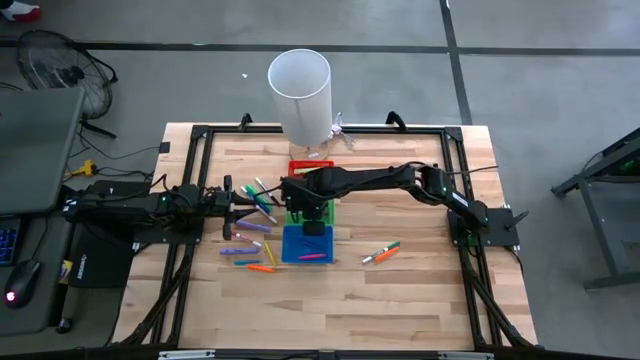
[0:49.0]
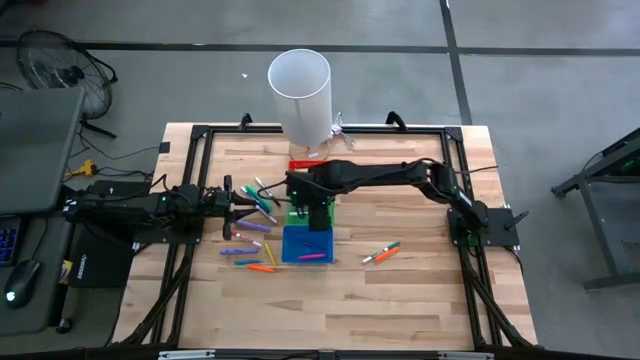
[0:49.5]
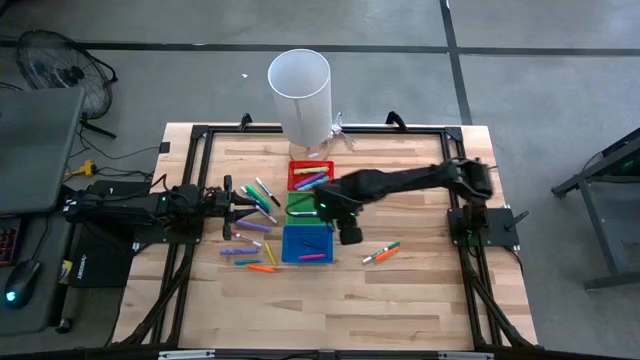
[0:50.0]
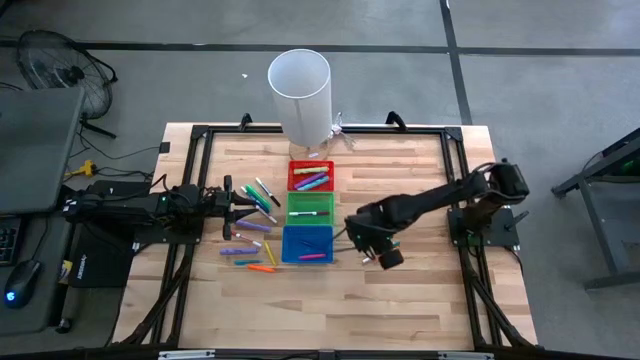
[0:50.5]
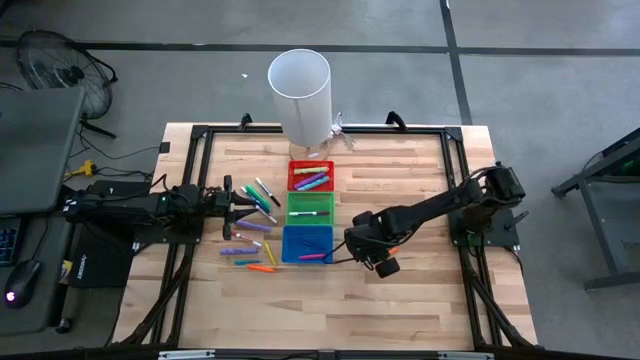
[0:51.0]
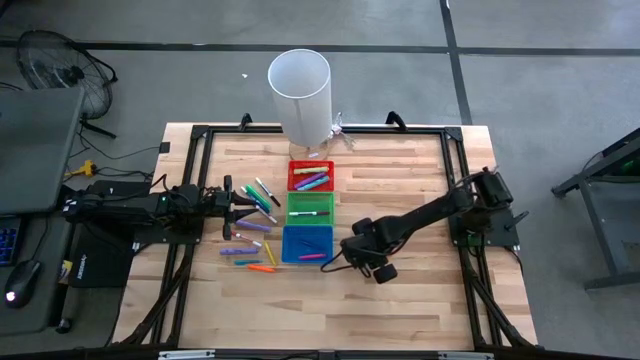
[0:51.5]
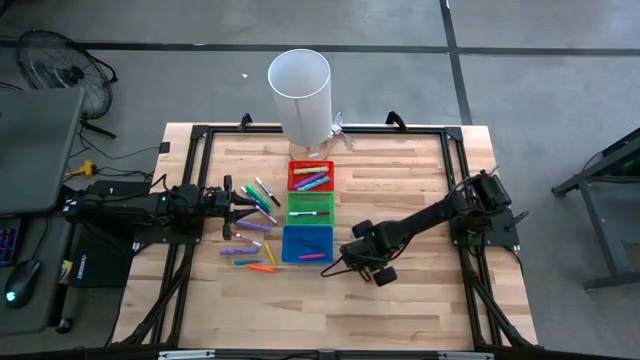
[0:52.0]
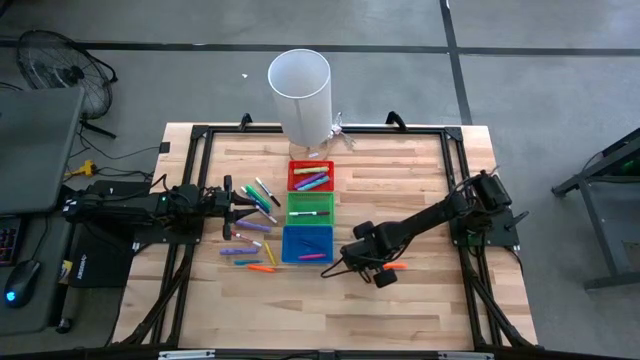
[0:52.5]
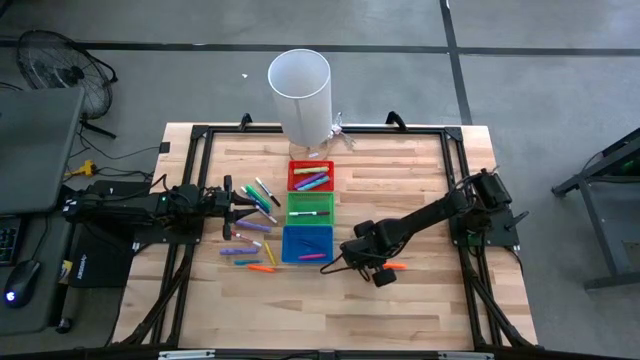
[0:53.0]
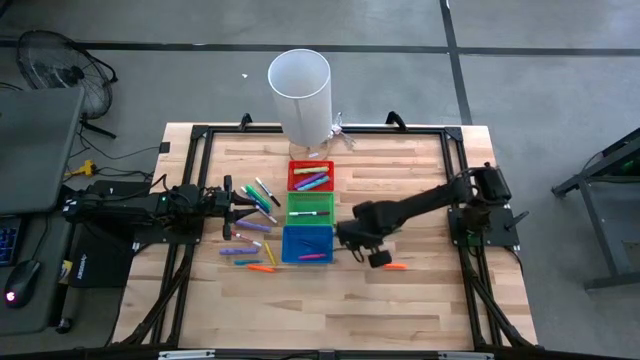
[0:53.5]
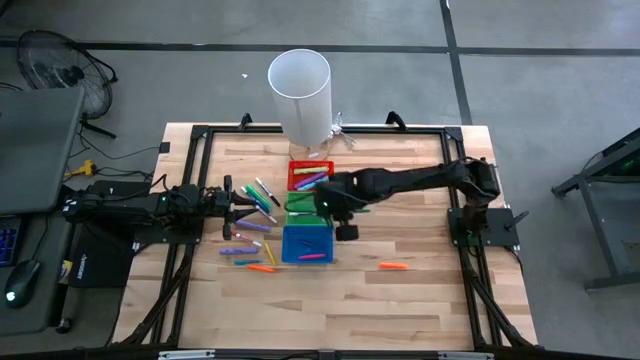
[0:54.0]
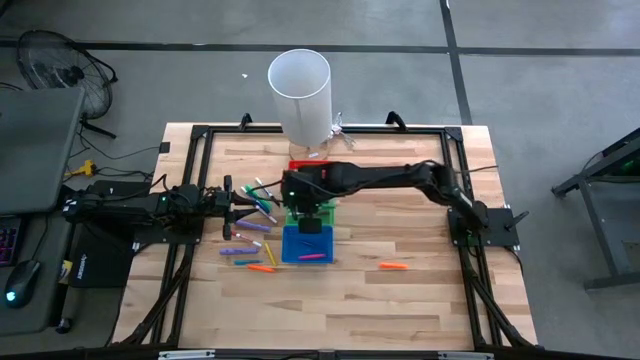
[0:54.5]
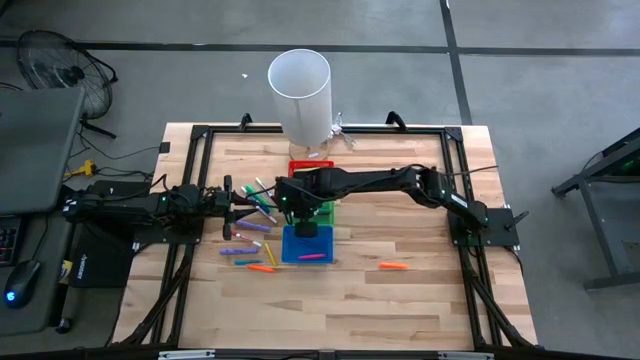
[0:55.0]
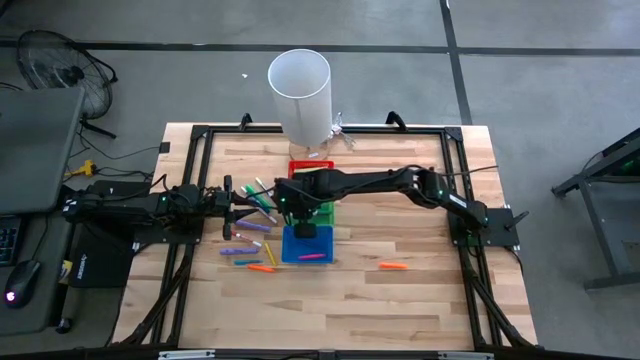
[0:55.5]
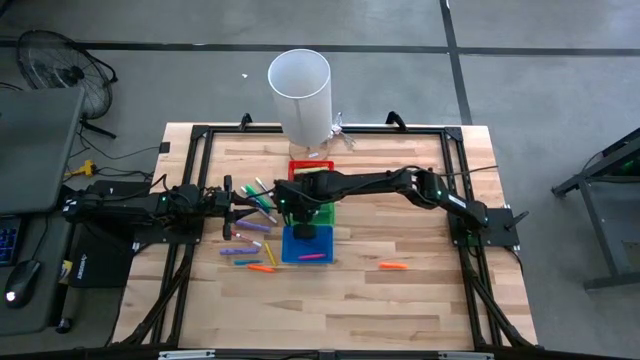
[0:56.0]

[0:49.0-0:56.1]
Task: Pick & Place Markers
Put the white and green marker pen into the green bin

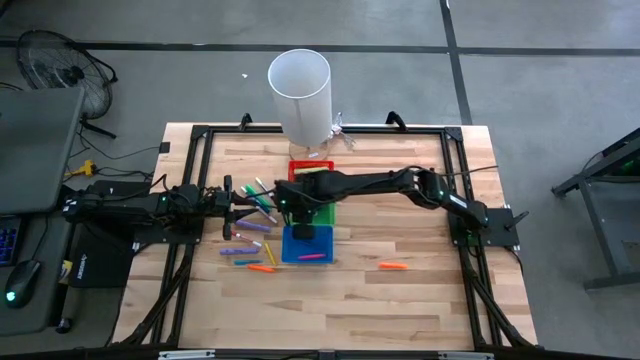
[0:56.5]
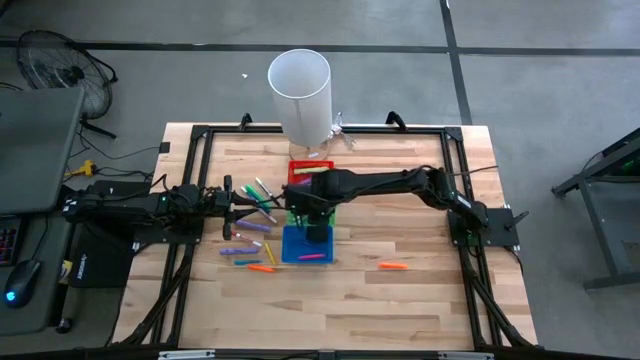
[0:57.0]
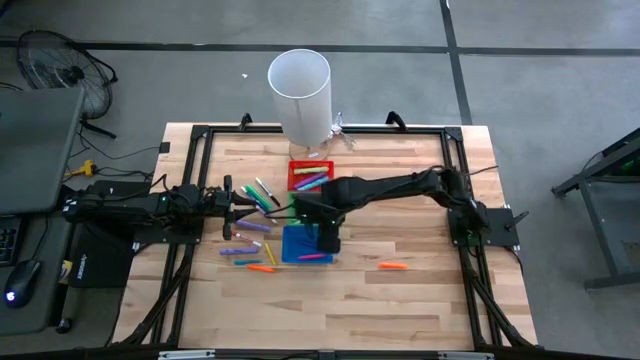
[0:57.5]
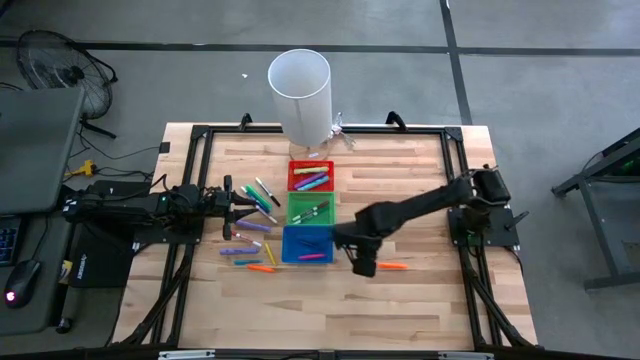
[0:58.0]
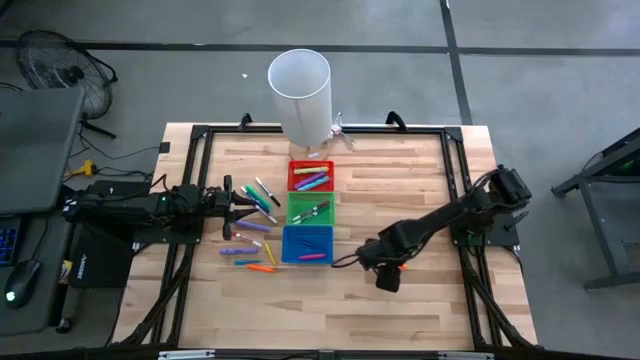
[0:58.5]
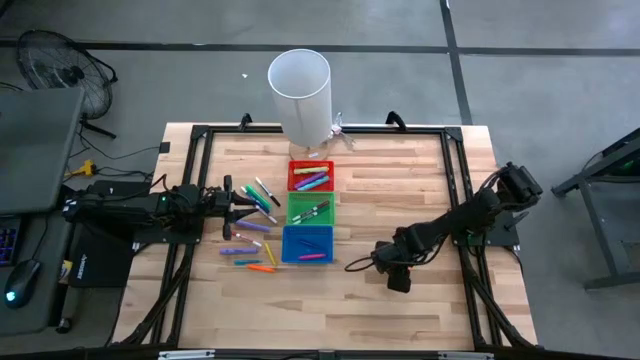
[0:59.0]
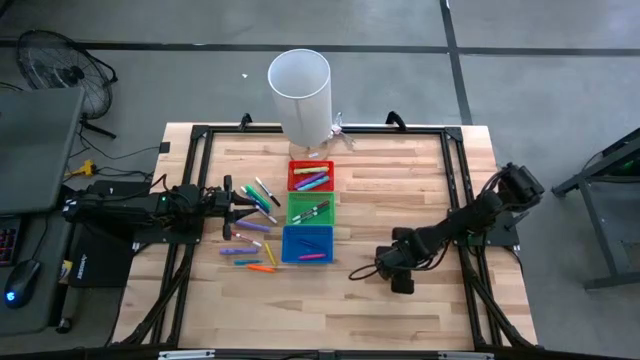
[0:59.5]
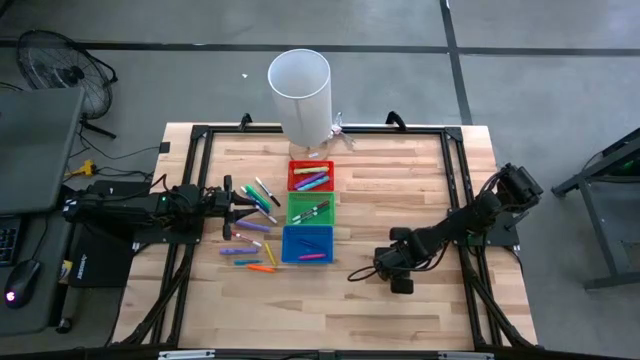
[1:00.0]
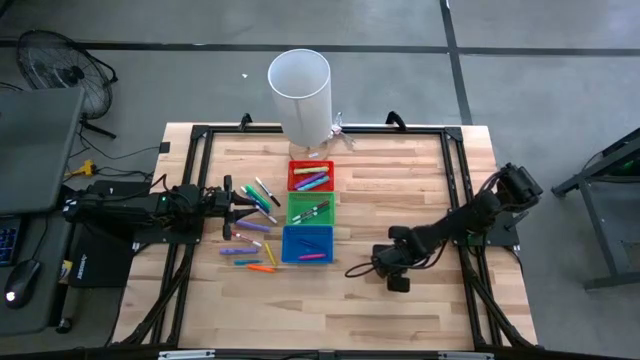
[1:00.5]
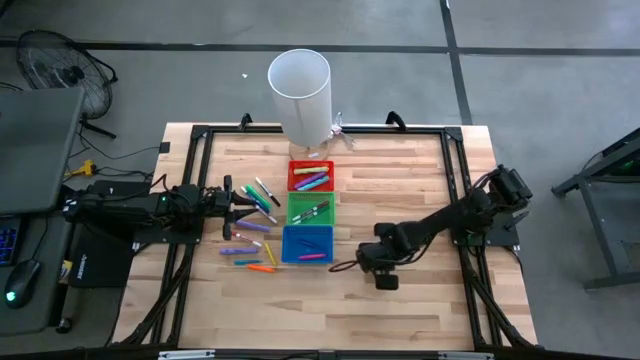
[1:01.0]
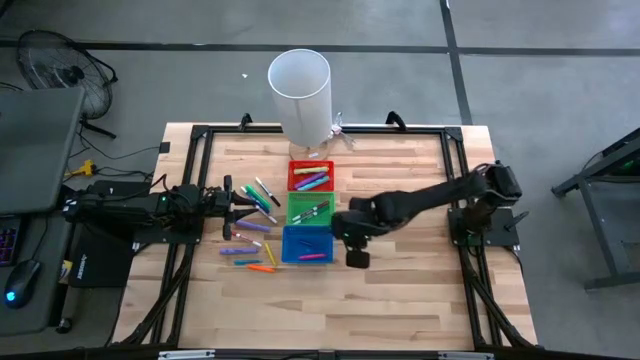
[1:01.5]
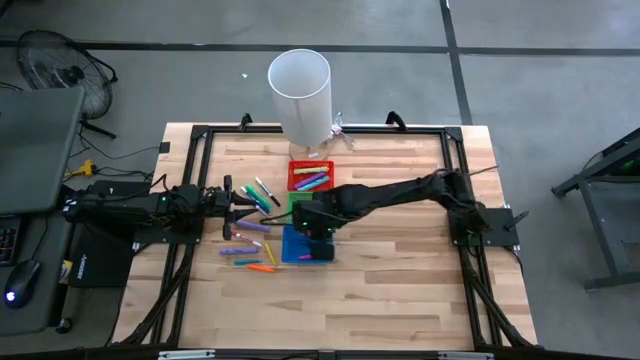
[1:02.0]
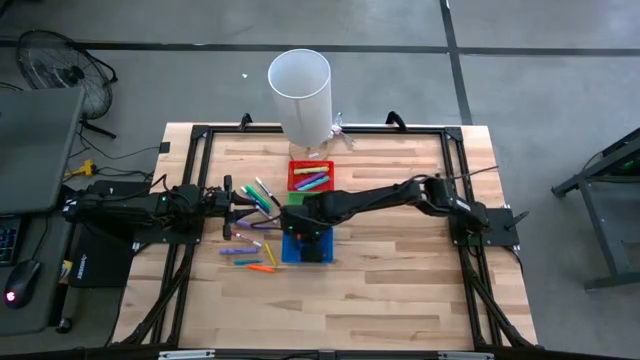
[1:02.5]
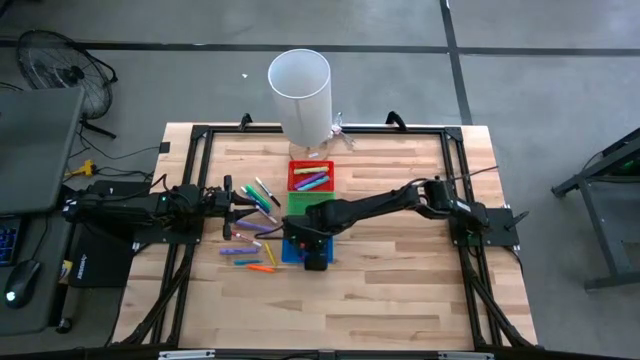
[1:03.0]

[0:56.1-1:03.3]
Put the orange pen into the blue bin

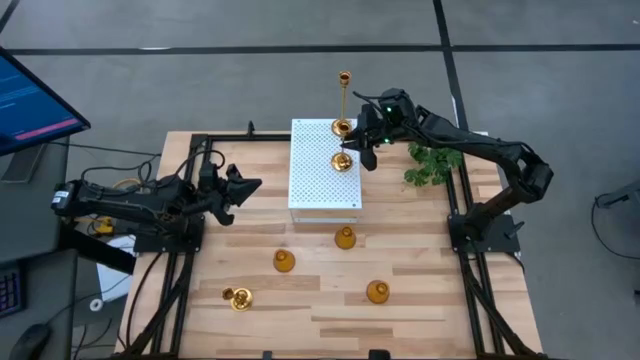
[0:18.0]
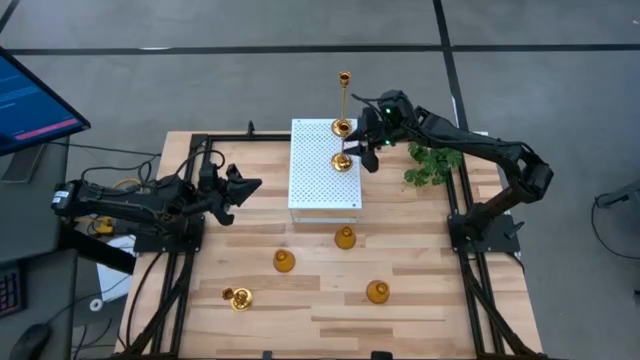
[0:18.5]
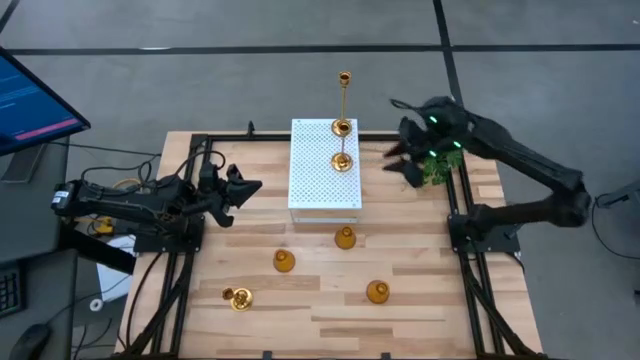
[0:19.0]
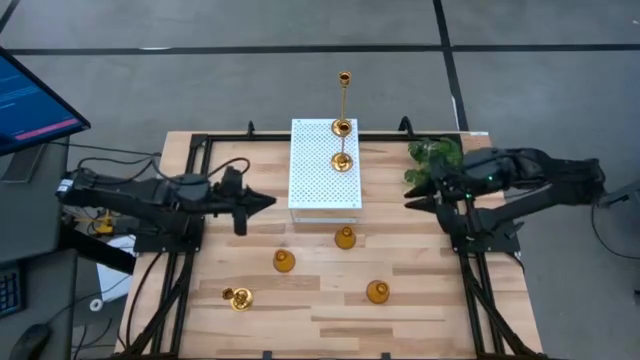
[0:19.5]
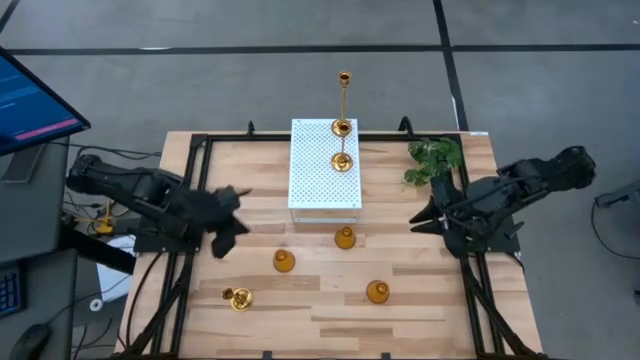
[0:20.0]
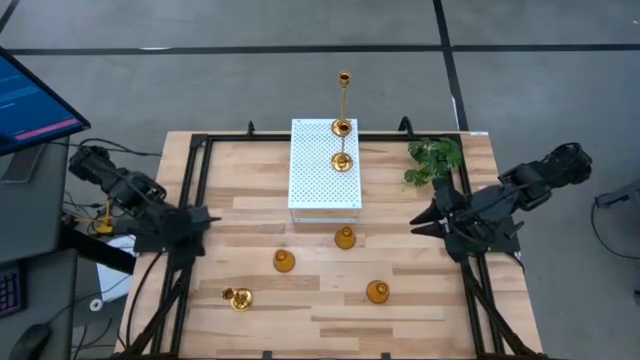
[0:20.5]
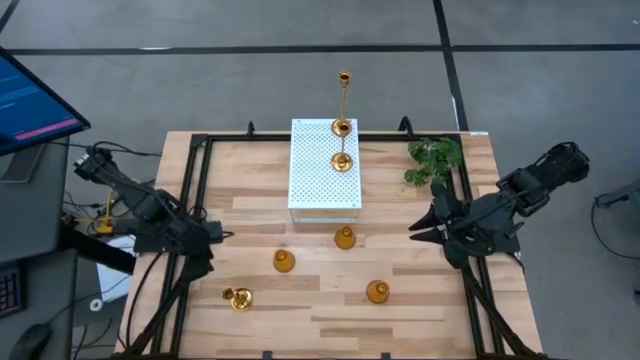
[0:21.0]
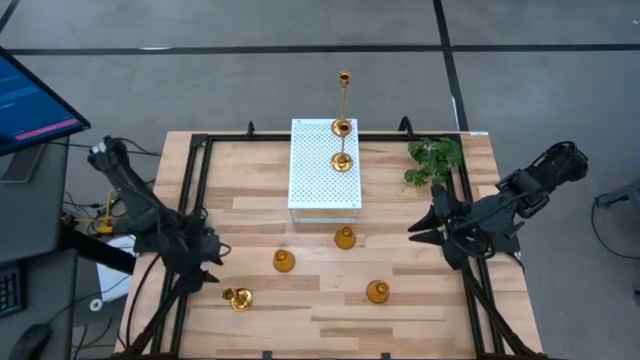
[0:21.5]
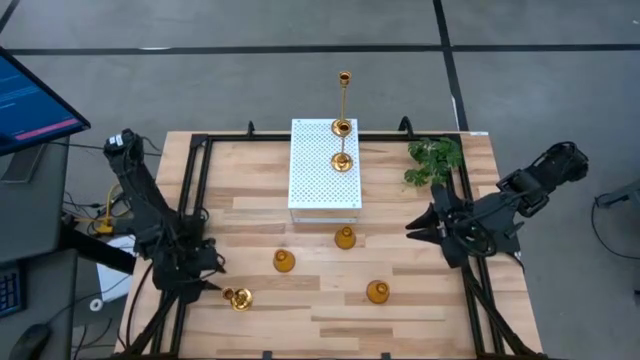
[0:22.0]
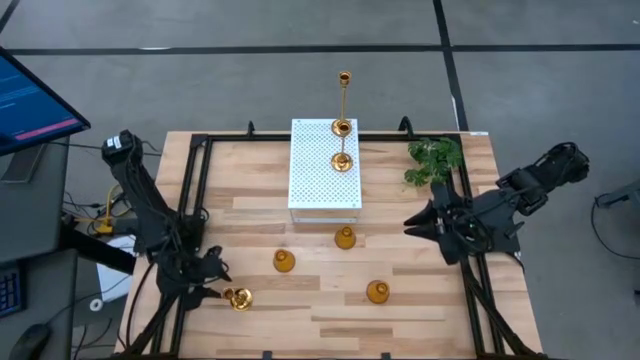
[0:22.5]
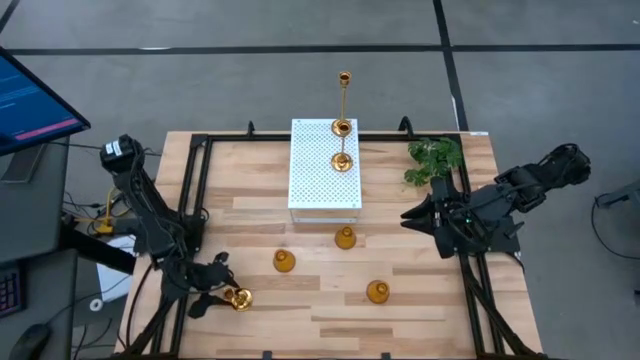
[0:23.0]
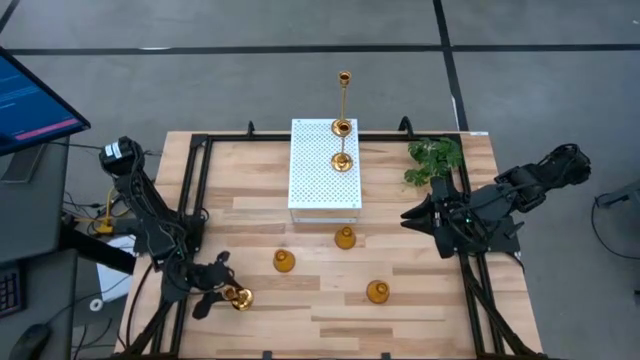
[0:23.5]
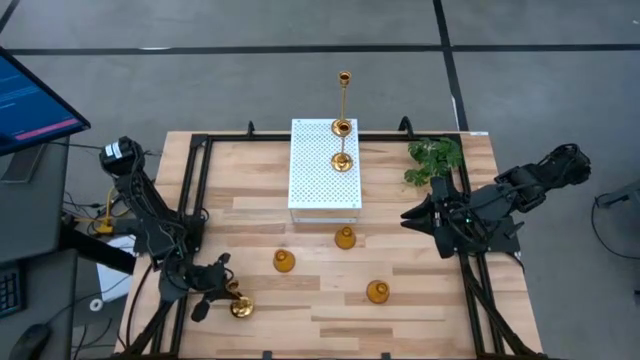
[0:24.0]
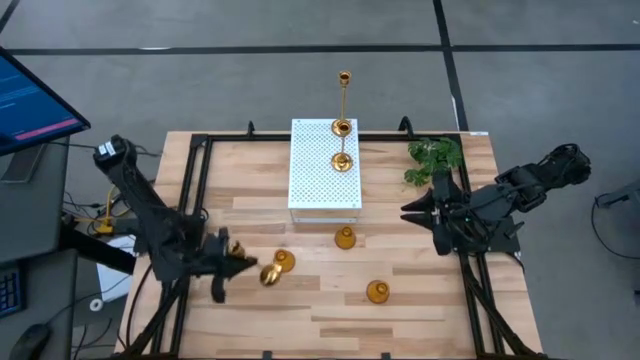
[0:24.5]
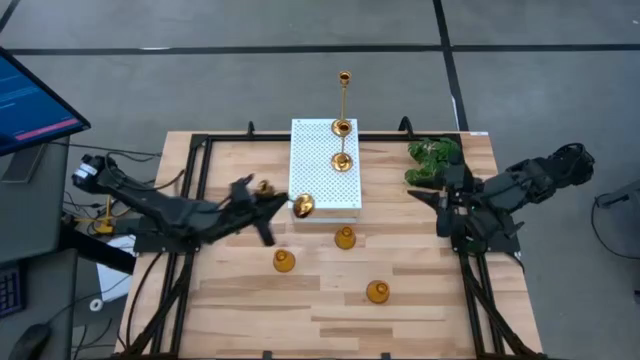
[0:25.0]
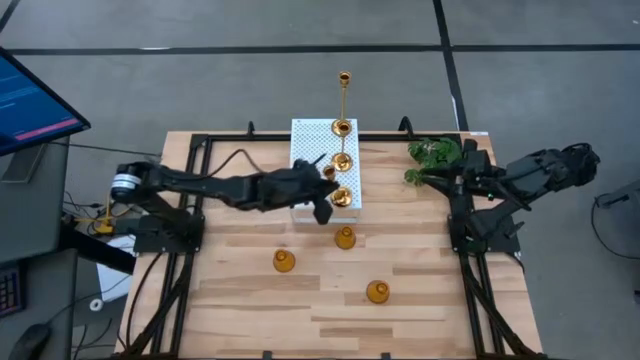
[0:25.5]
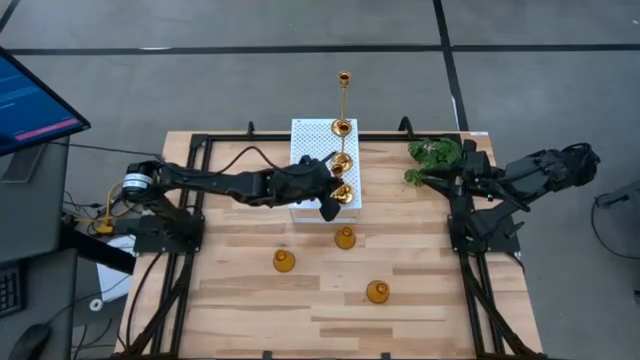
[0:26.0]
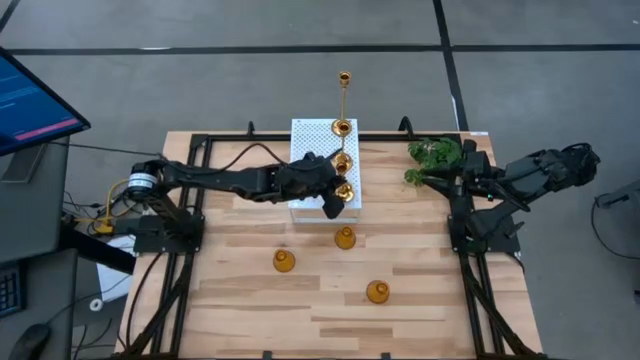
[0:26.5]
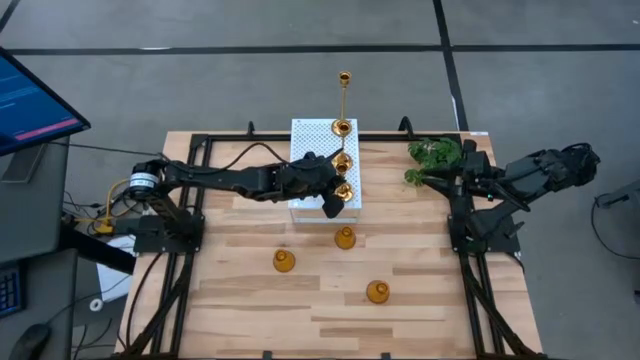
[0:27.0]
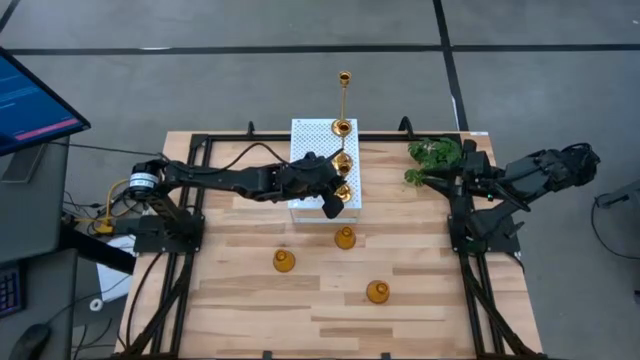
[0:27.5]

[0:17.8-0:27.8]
Task: Pick & Place candle stick holders
Align the gold candle holder with the other gold candle holders on the shelf
